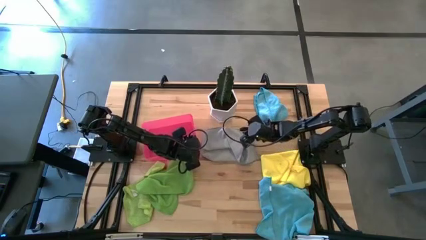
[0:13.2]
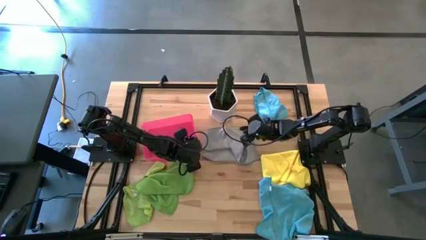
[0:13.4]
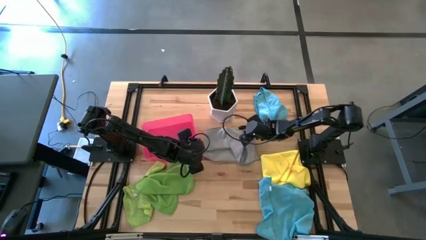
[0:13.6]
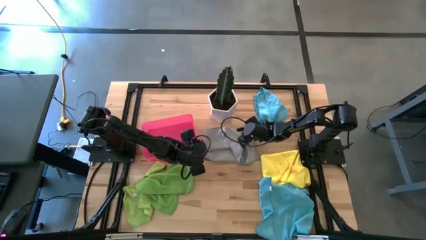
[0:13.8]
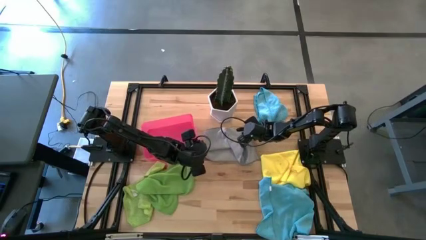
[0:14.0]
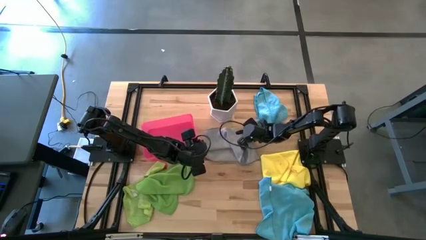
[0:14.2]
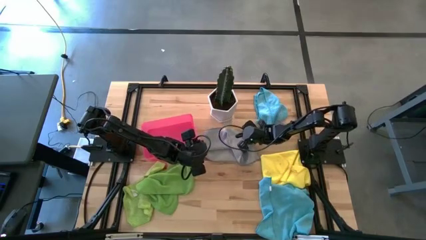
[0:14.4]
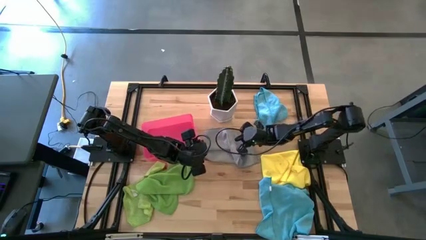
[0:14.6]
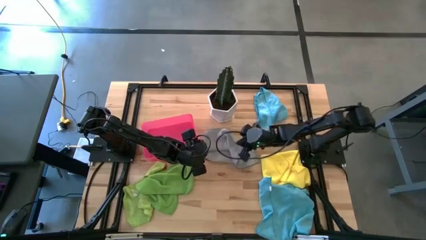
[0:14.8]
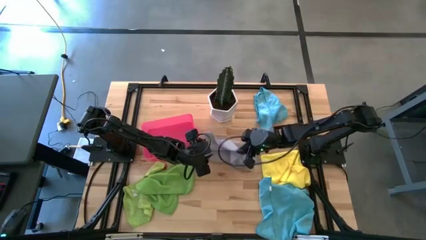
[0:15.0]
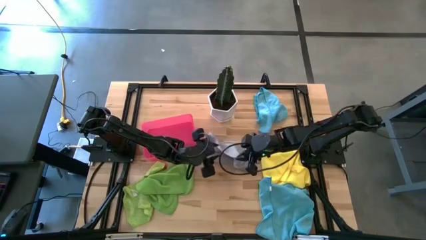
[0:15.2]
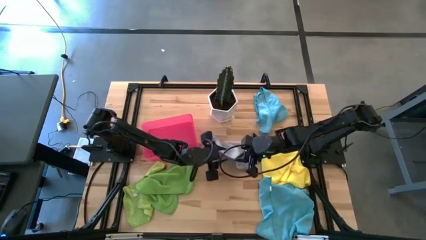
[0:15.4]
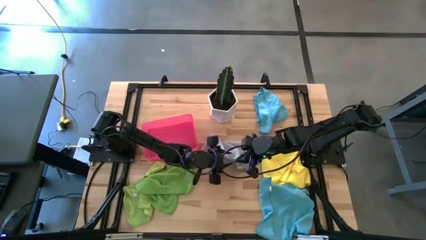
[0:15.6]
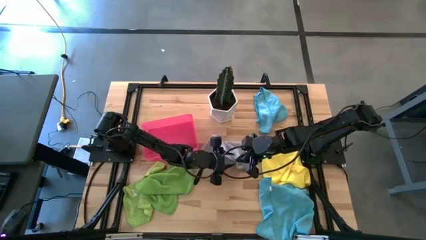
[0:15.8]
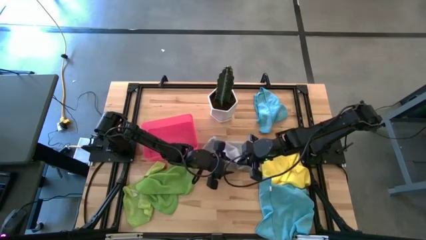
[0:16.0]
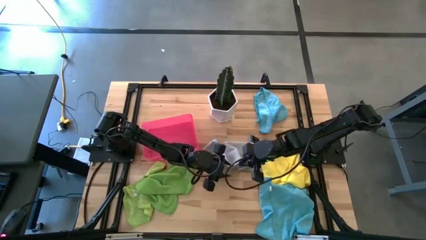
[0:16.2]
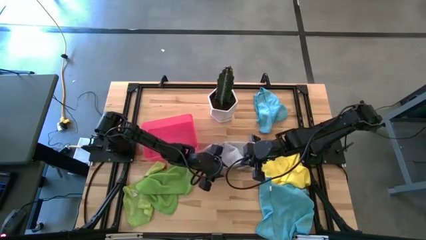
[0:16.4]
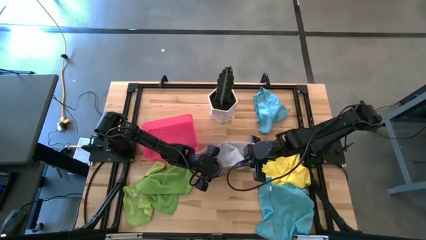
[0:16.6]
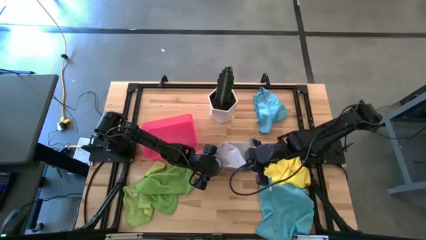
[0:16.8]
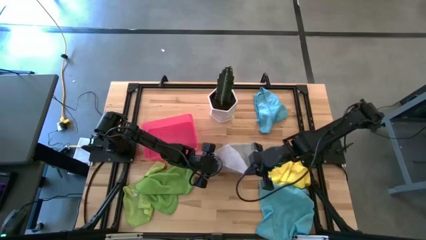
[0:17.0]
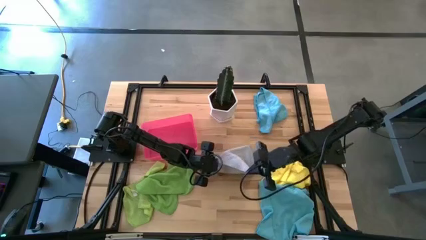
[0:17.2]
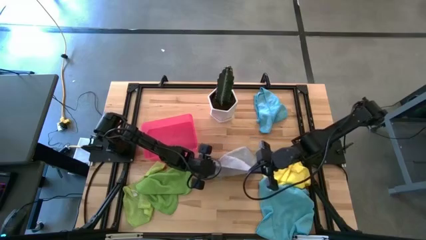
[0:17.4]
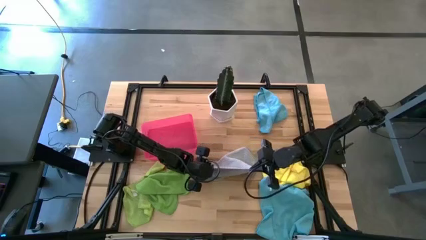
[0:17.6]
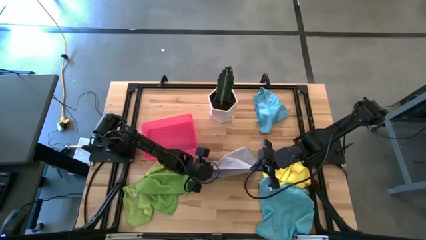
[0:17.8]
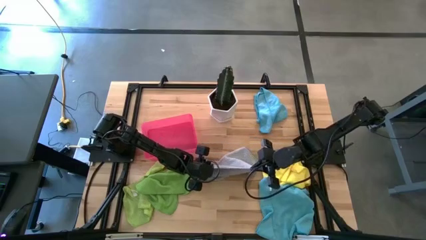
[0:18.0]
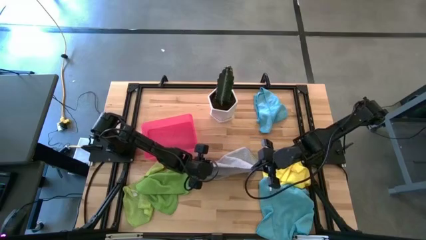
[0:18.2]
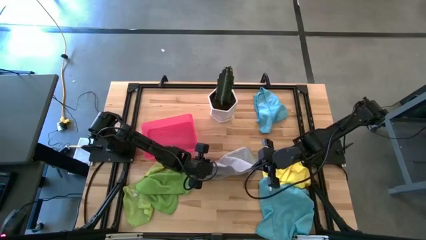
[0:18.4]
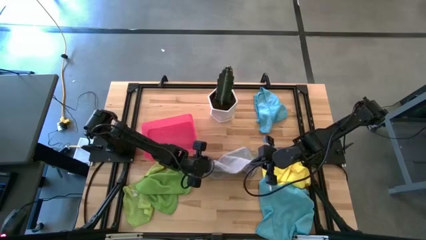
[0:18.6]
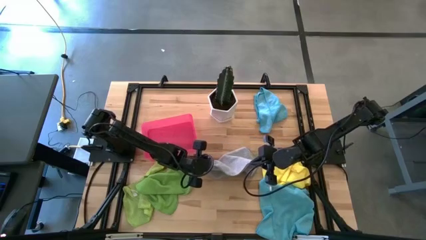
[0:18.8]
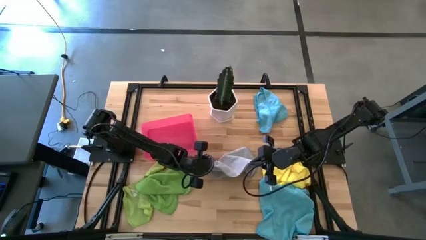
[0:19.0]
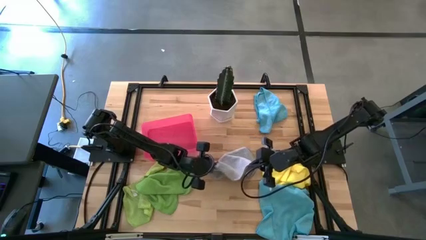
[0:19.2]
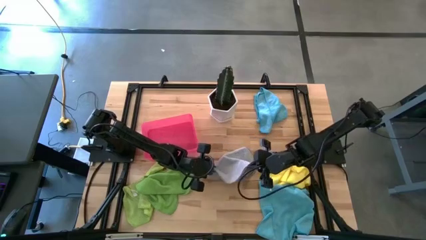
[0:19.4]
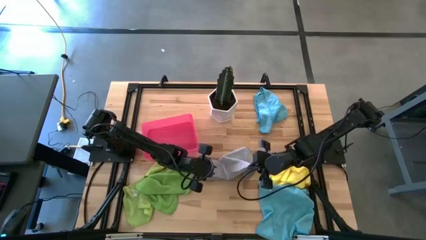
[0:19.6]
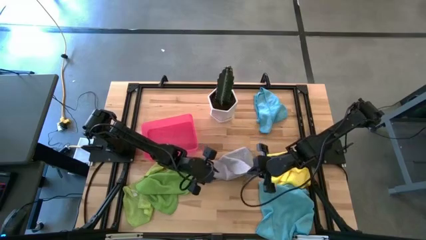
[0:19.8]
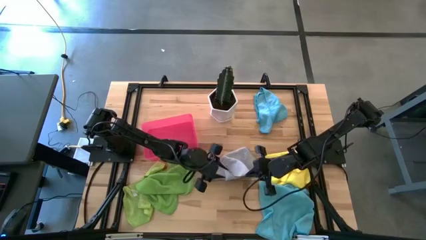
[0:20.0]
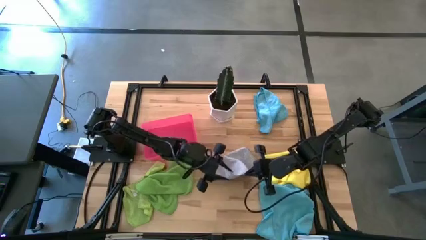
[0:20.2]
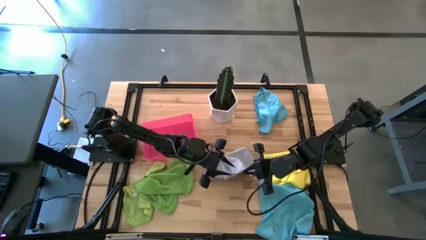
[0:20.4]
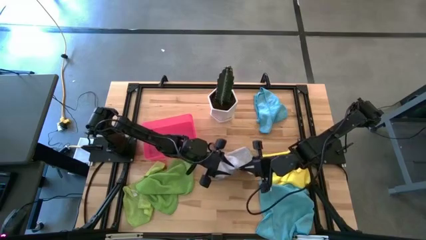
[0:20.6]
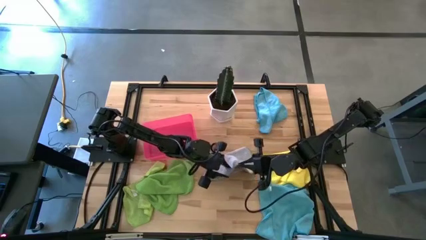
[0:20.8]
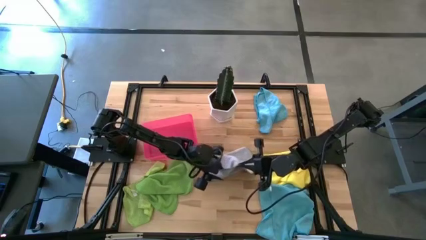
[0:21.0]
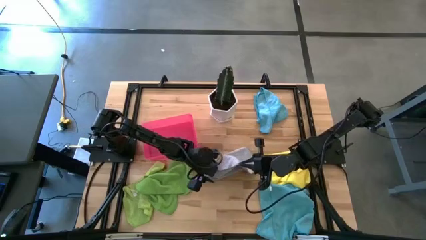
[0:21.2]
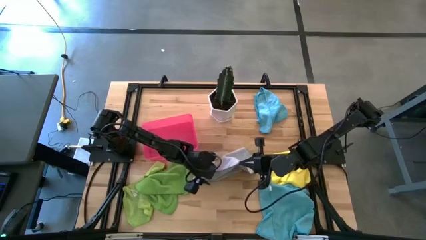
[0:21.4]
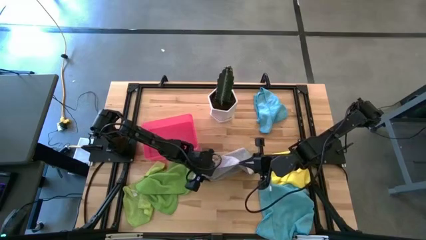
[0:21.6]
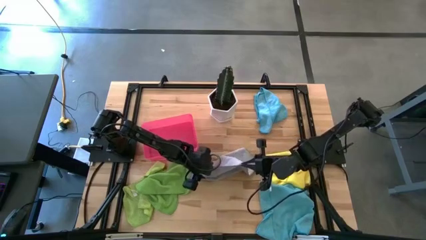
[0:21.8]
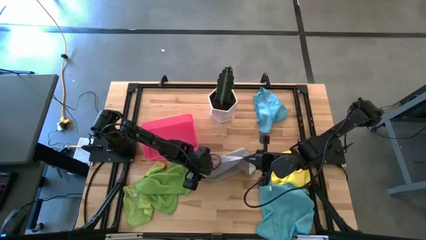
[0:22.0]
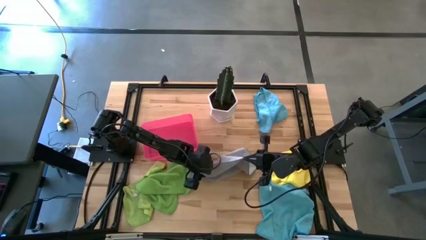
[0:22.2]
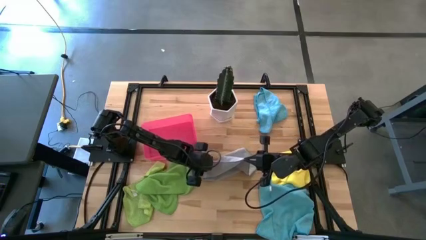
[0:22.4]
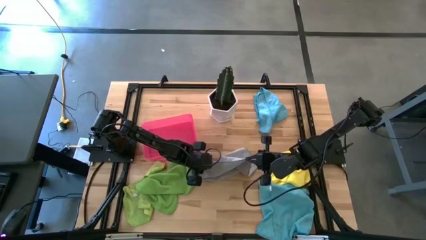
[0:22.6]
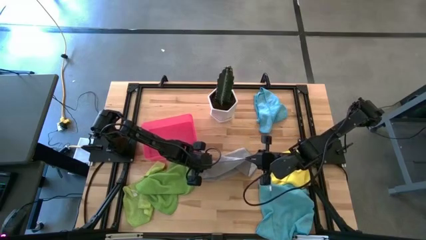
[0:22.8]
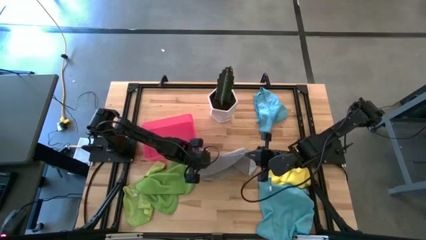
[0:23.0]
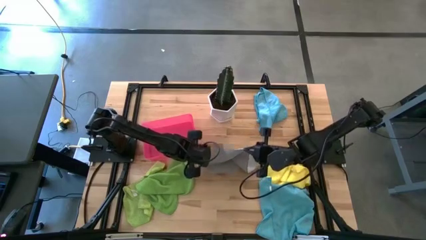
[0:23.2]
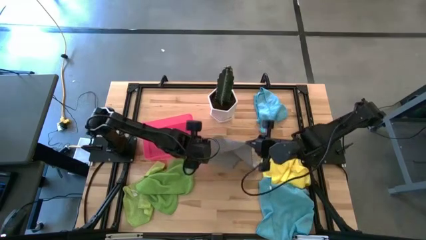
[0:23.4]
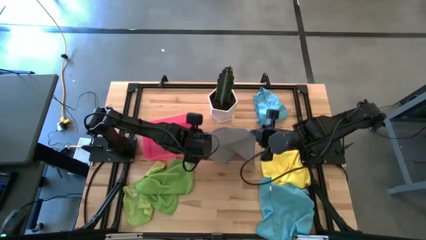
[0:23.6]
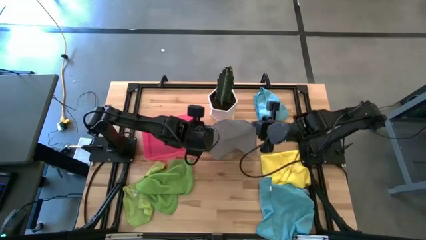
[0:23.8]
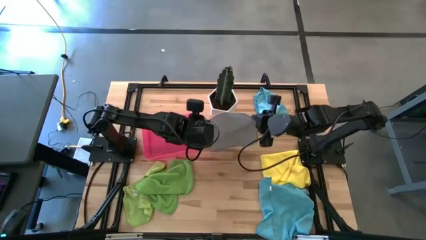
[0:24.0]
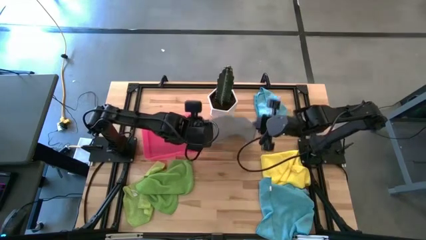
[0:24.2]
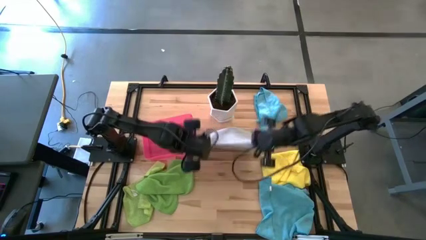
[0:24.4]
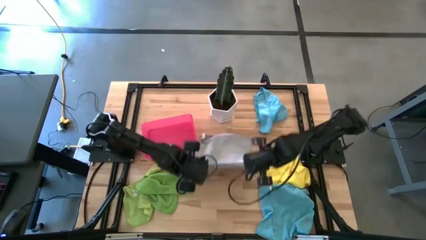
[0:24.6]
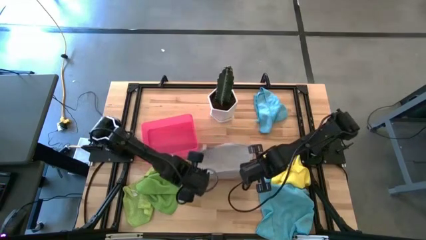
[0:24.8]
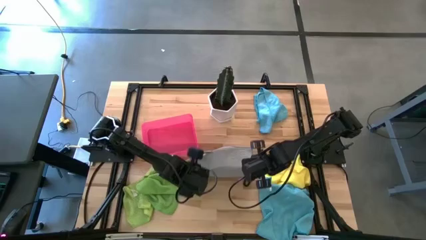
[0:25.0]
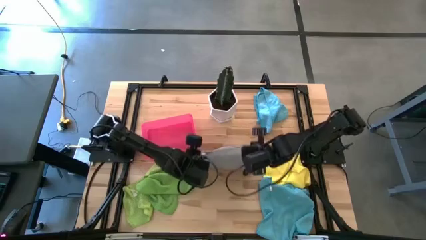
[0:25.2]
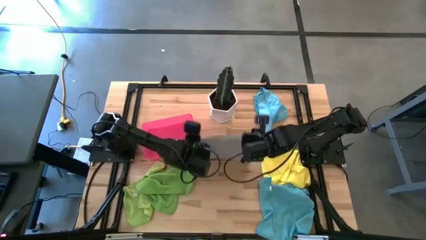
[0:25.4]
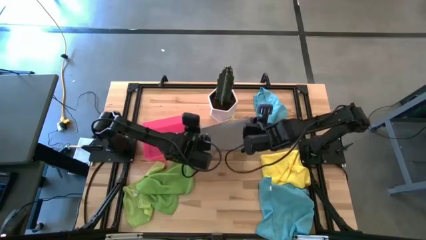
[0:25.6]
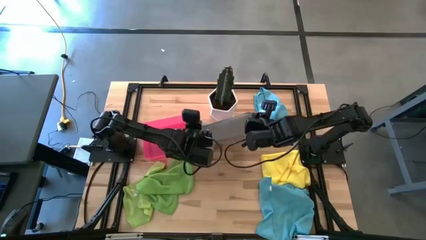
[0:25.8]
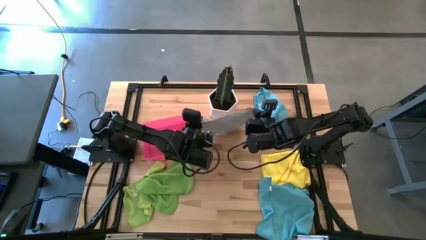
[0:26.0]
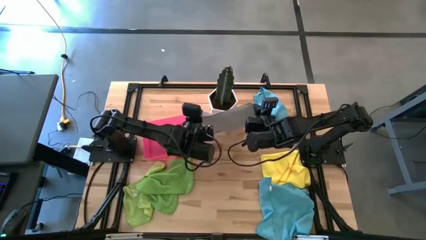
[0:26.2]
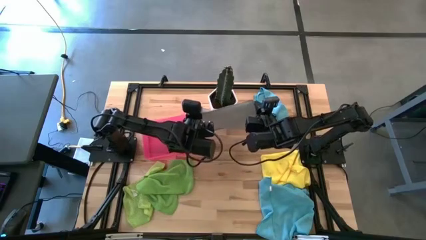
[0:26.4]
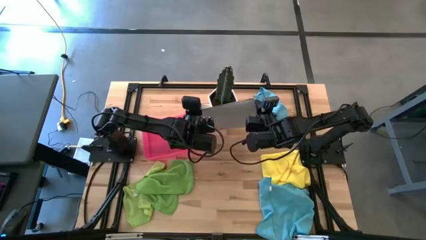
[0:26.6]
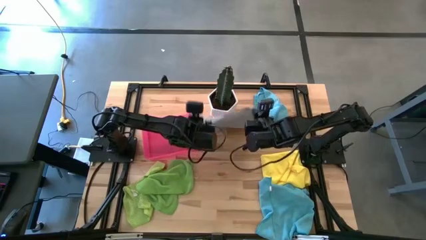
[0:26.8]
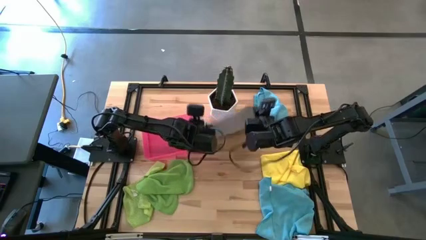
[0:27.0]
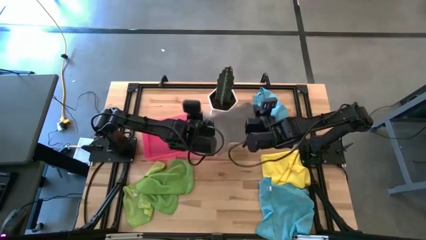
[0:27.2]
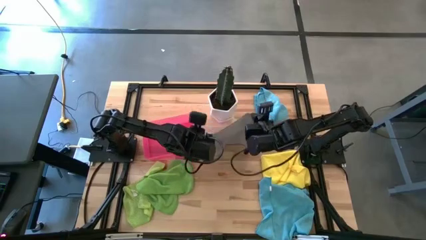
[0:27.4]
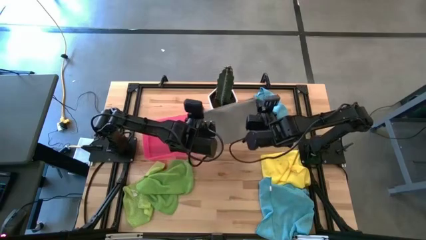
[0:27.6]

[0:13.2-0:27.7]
Task: Fold microfiber towels
Fold the gray microfiber cloth
